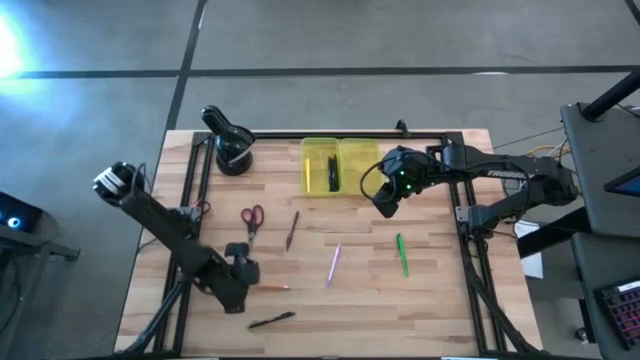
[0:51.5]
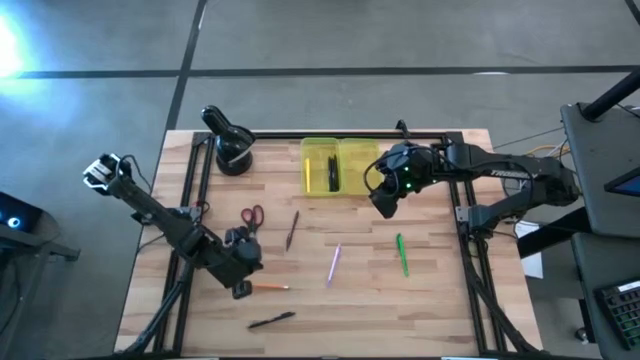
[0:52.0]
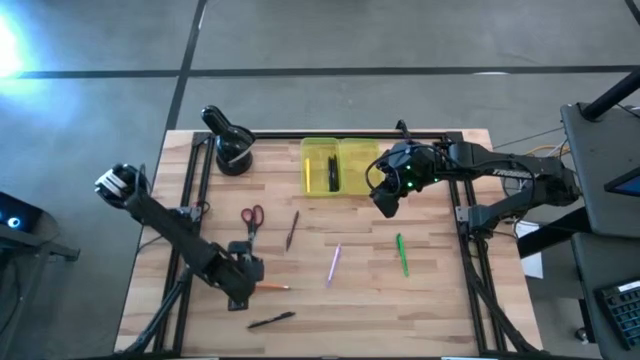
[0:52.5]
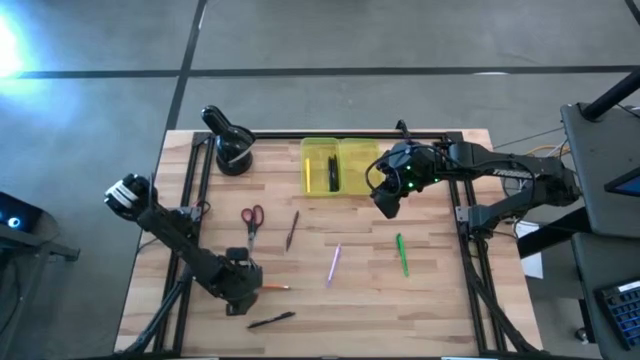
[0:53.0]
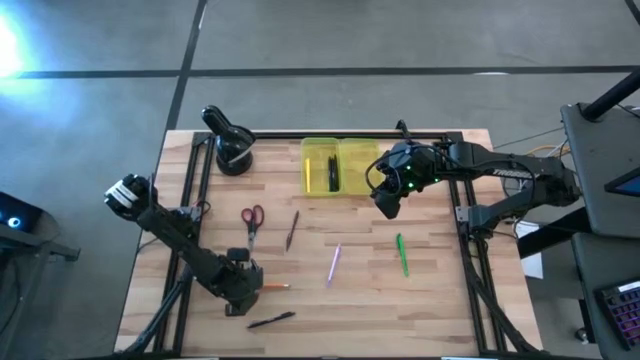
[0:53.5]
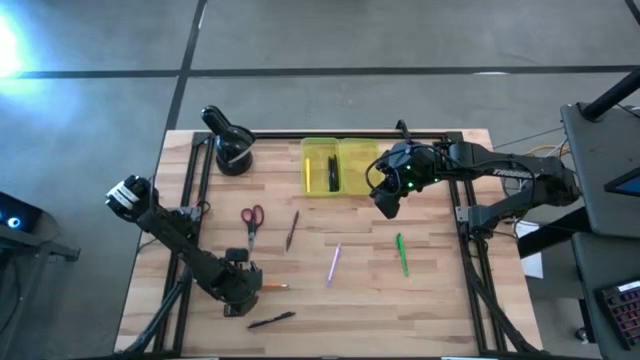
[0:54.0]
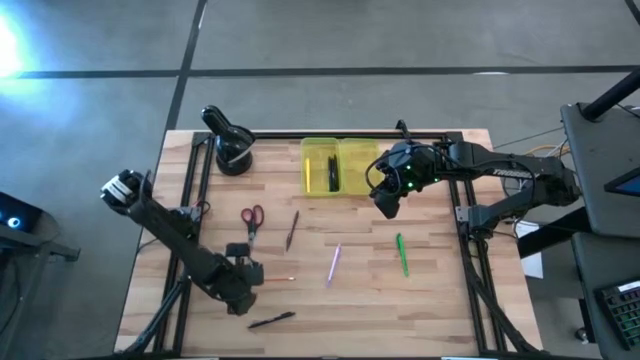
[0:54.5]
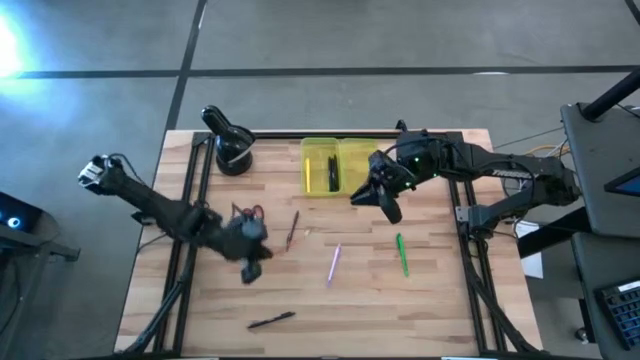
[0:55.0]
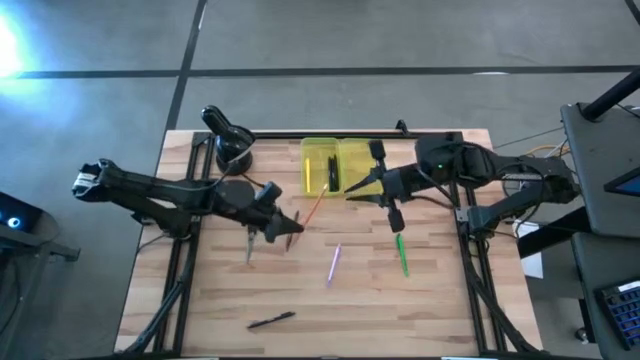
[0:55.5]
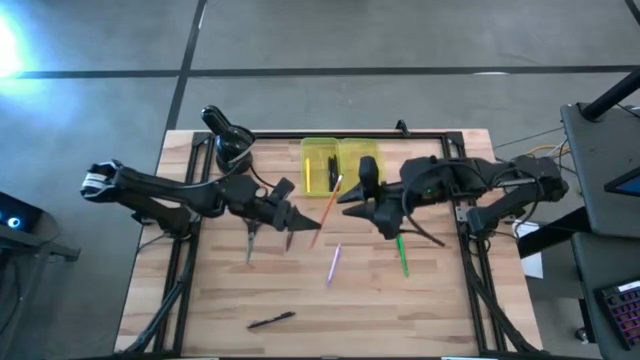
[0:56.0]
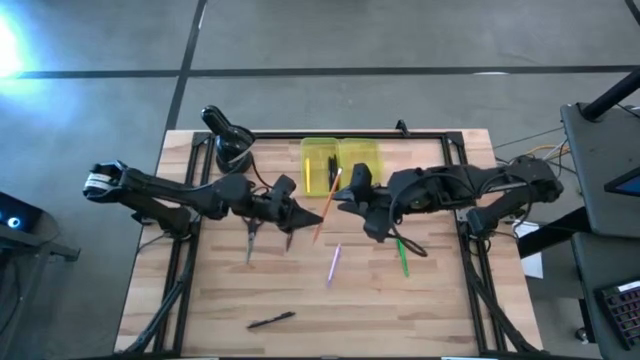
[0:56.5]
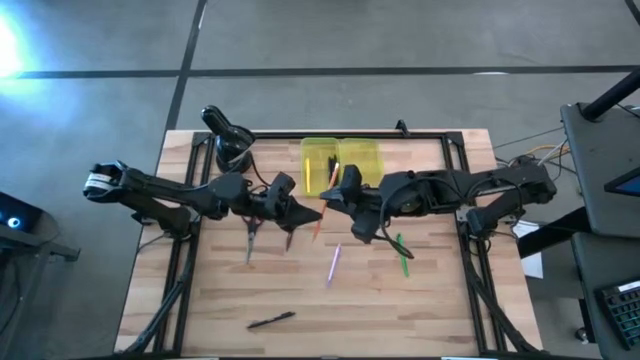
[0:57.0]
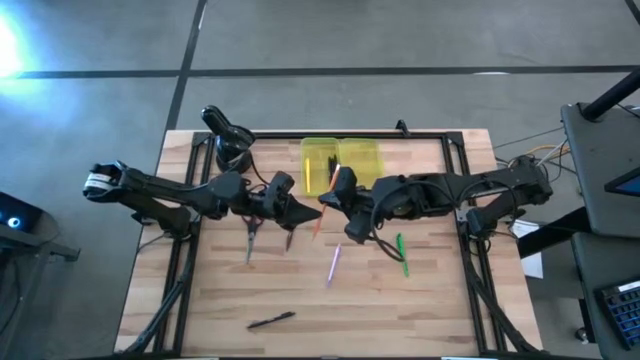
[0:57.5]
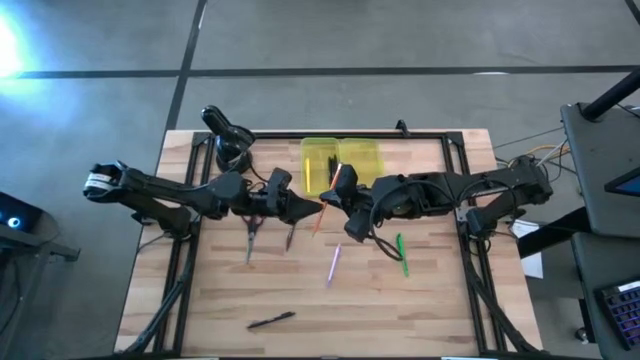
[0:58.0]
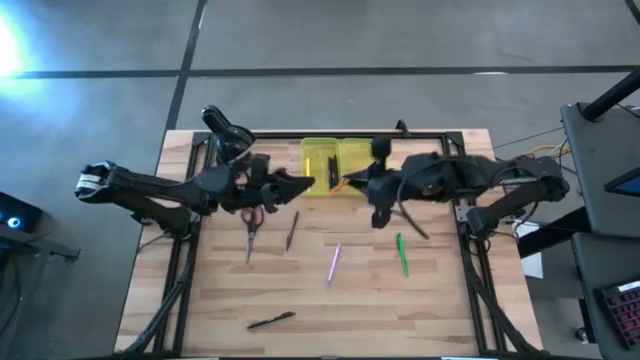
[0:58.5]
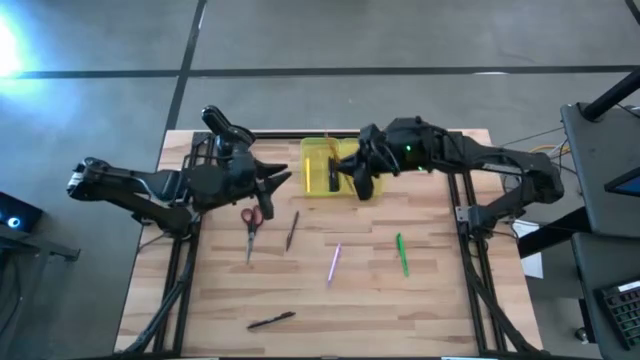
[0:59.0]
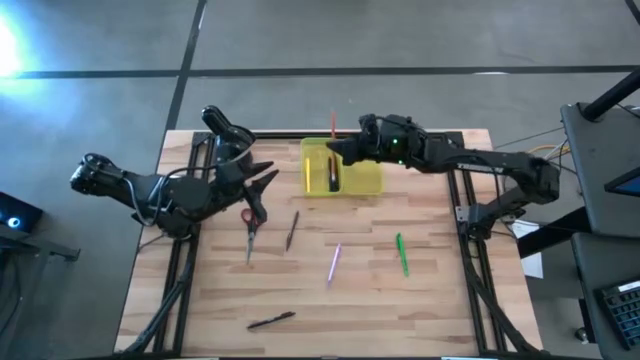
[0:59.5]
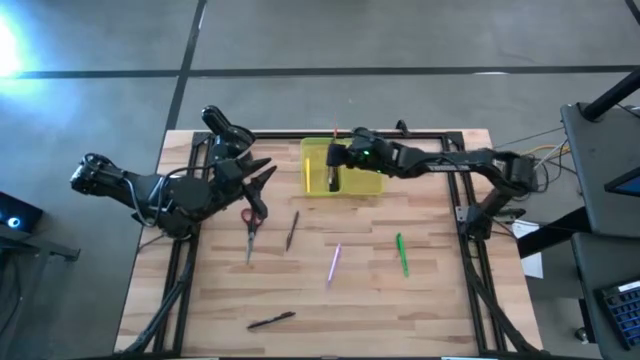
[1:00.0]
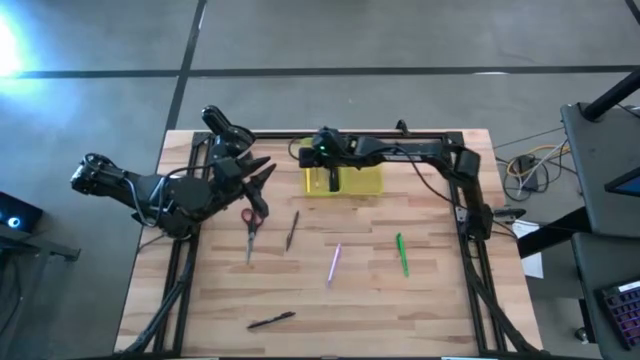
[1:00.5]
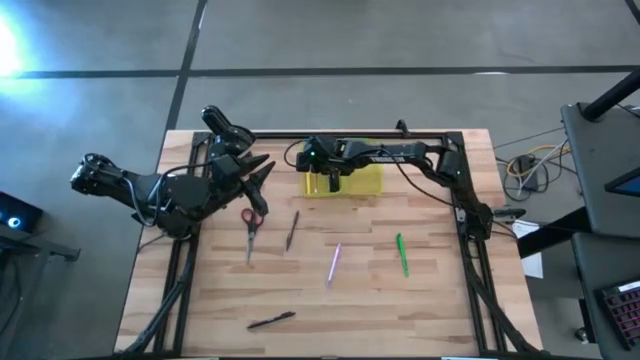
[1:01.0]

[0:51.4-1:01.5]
Task: Pick & place school supplies into a supply box
Put the orange pencil into the yellow supply box

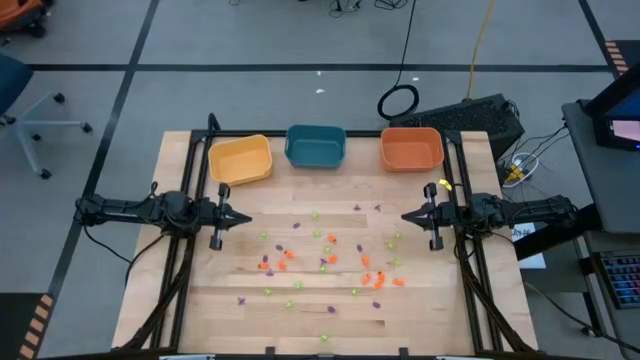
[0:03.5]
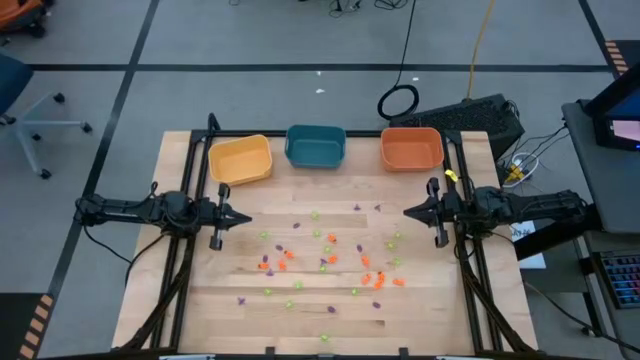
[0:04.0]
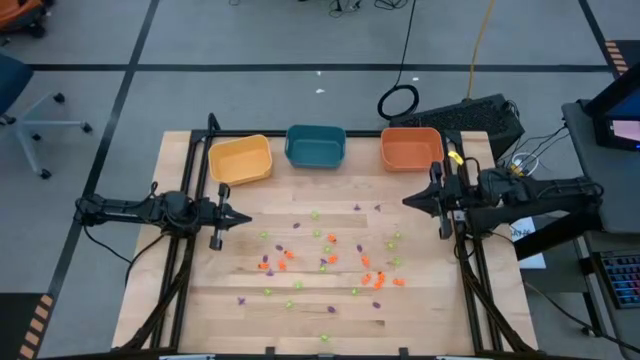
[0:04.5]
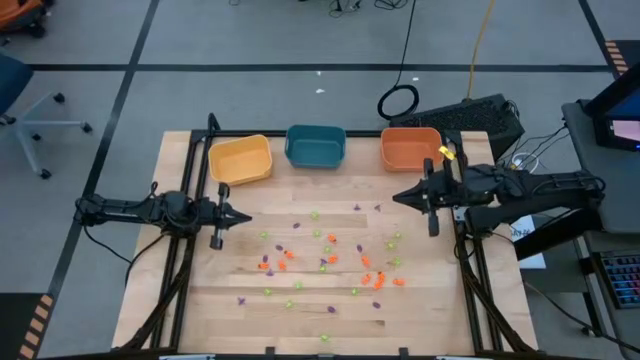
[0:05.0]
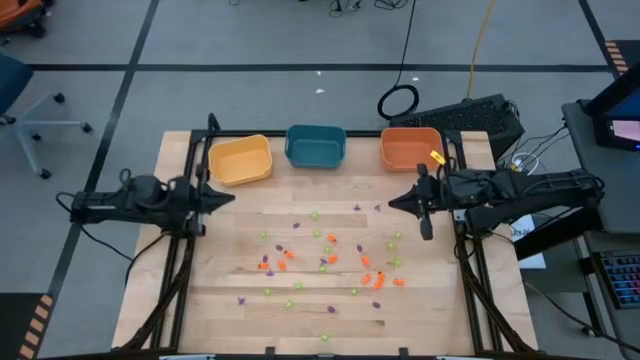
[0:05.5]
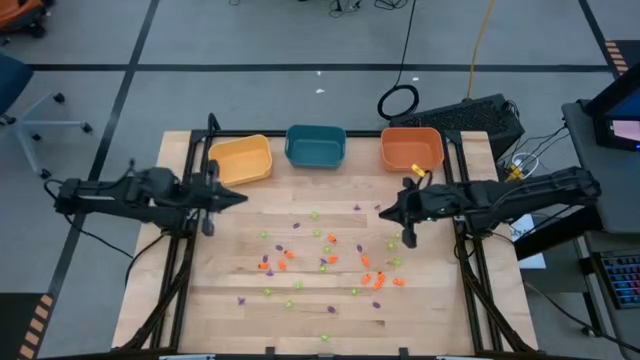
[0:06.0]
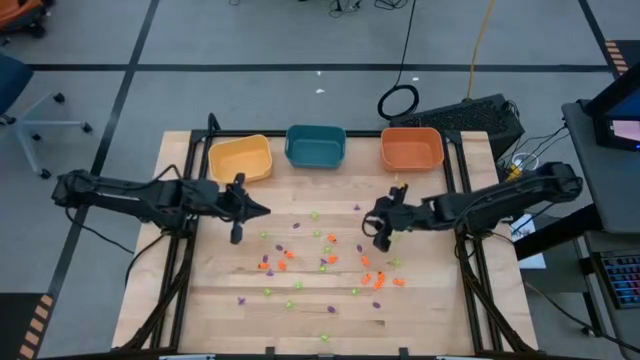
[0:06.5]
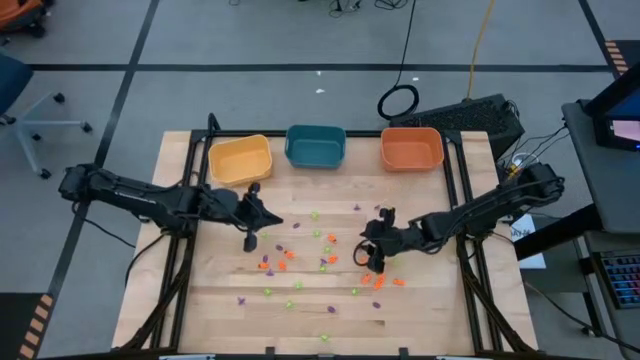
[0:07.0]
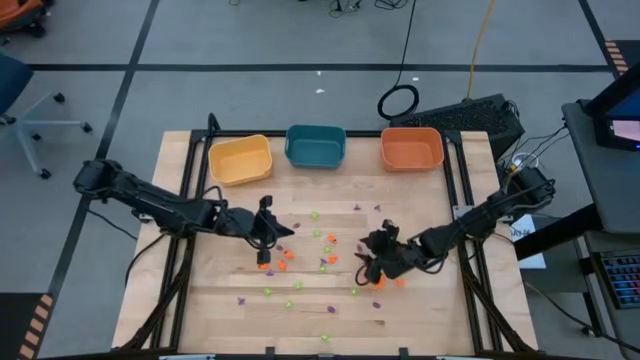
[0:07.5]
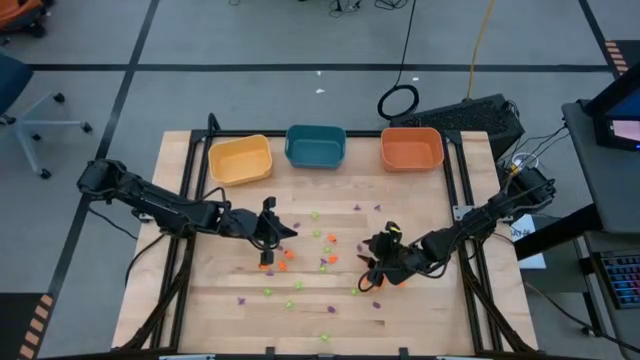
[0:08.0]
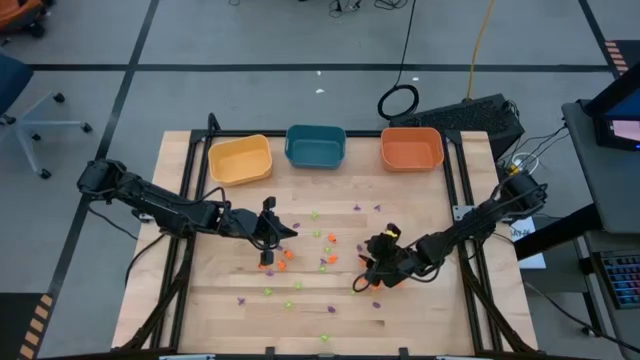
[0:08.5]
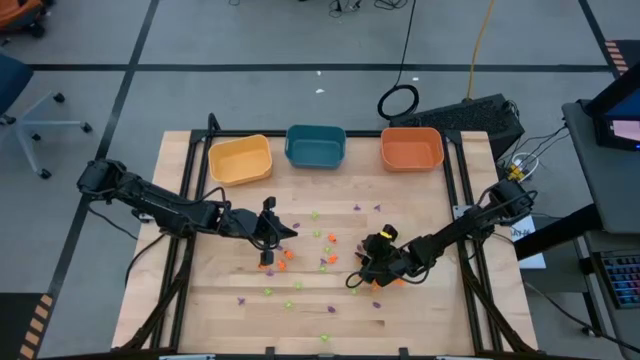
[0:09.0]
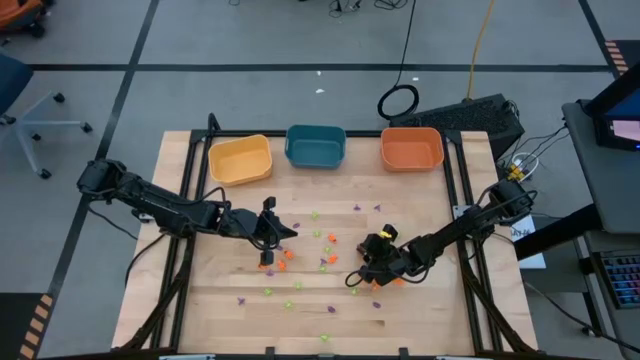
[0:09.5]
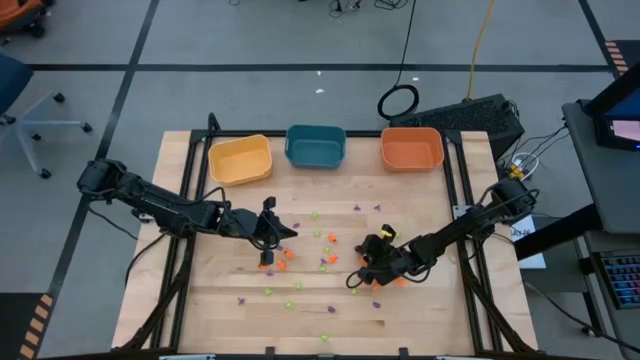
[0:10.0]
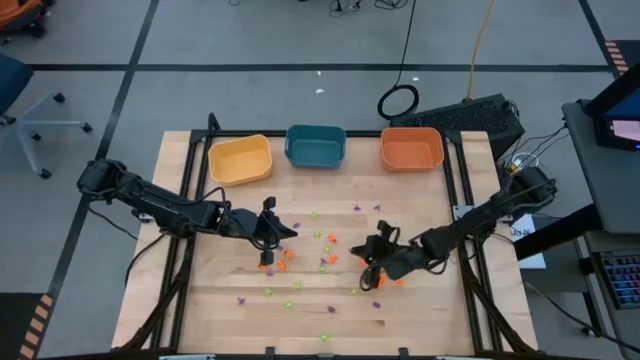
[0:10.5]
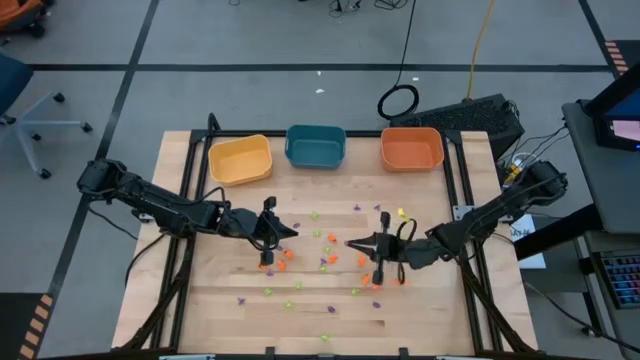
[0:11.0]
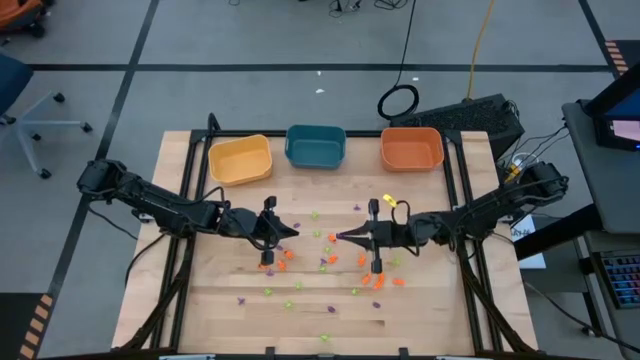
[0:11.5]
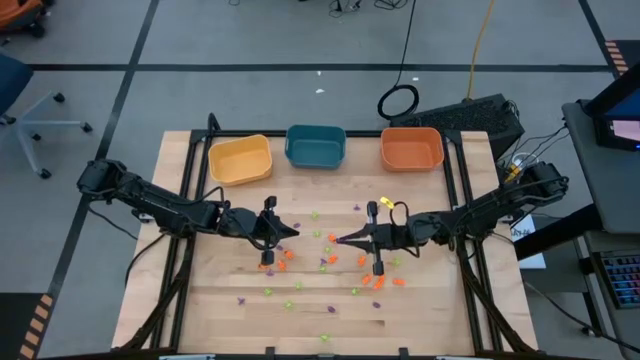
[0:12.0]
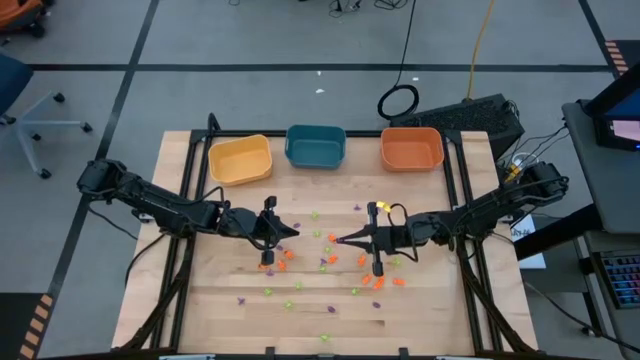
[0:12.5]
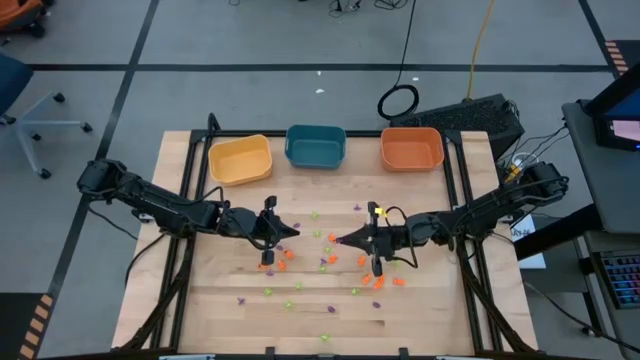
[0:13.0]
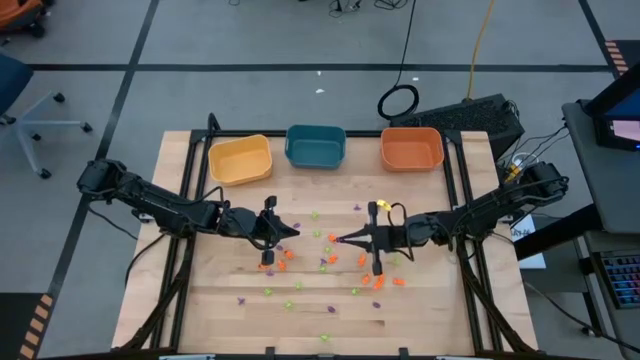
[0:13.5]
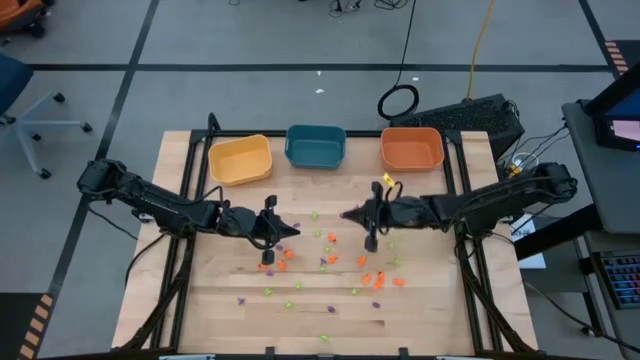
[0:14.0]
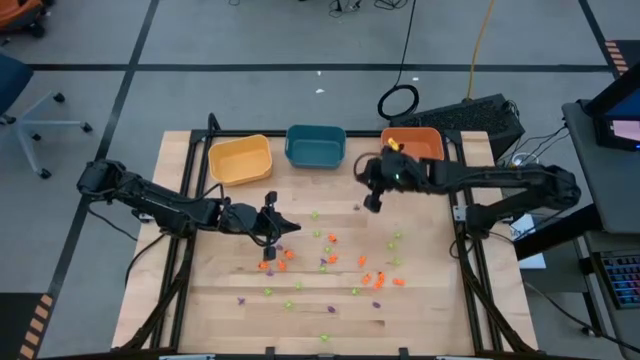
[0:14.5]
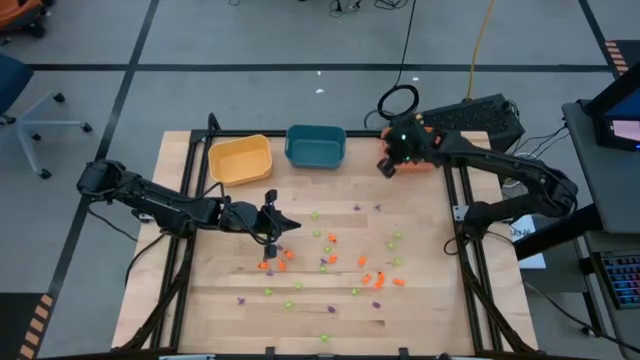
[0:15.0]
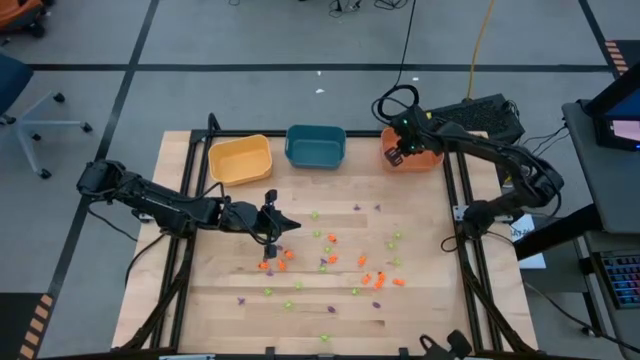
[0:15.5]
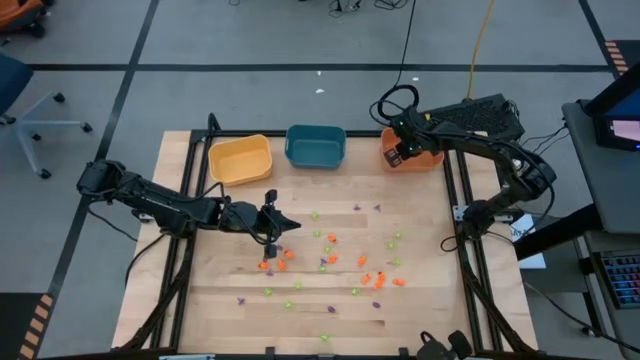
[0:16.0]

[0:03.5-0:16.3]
Task: Sort Halloween decoration
Put the violet witch hat toy into the orange bin
